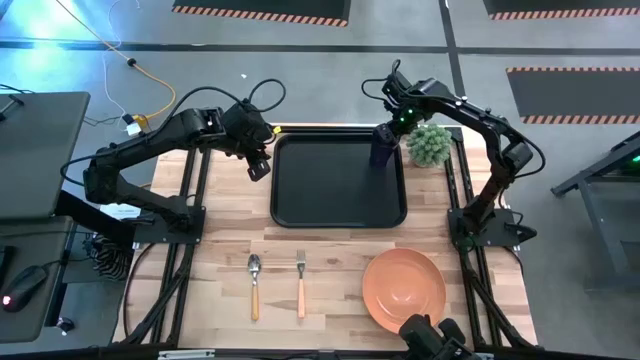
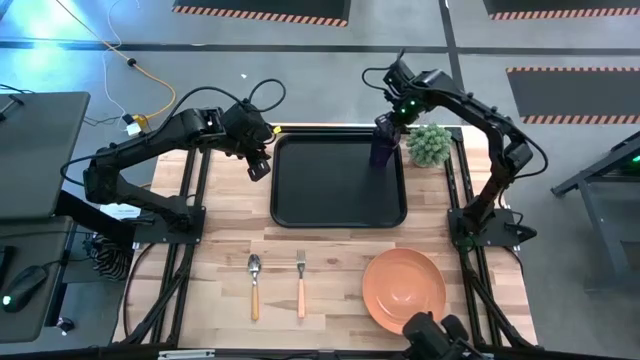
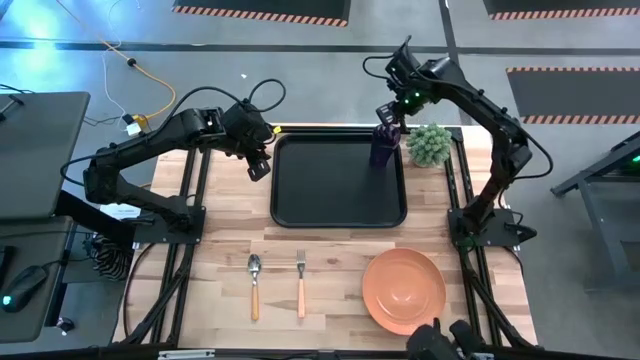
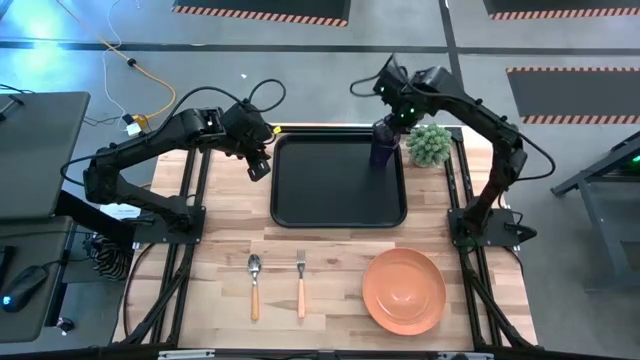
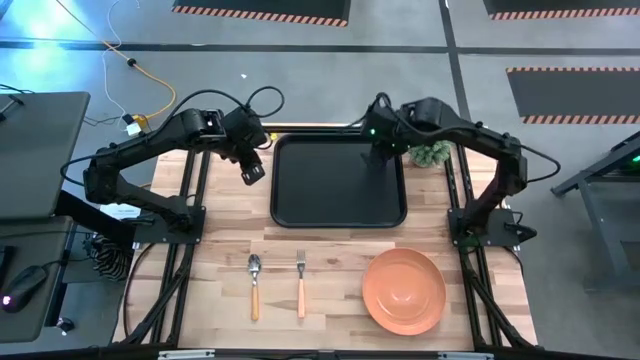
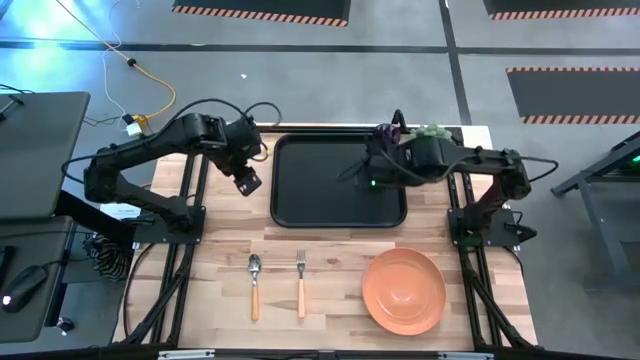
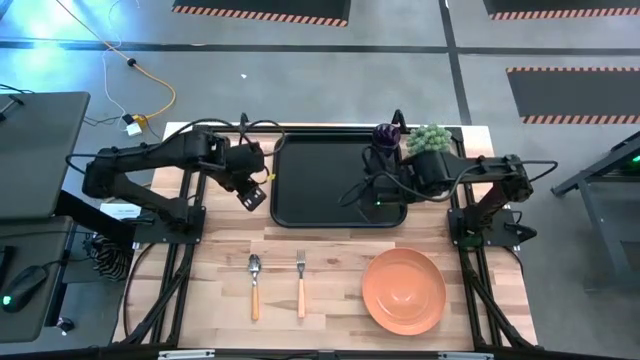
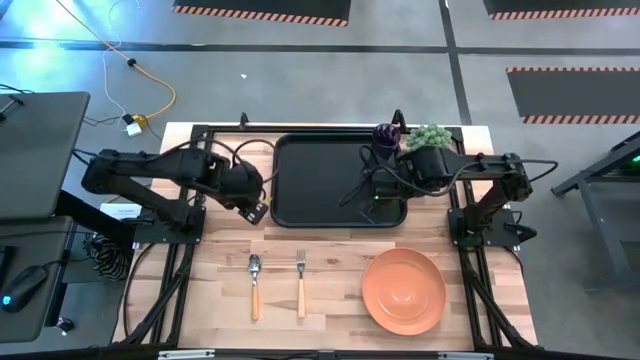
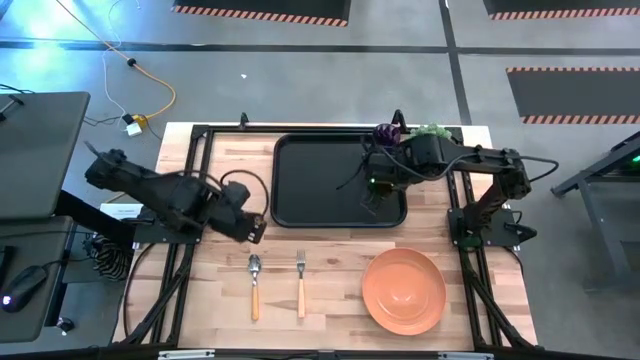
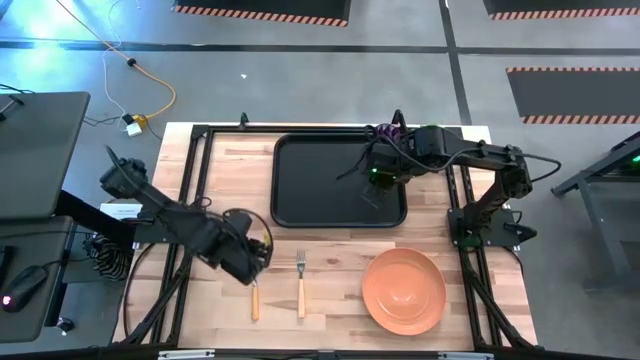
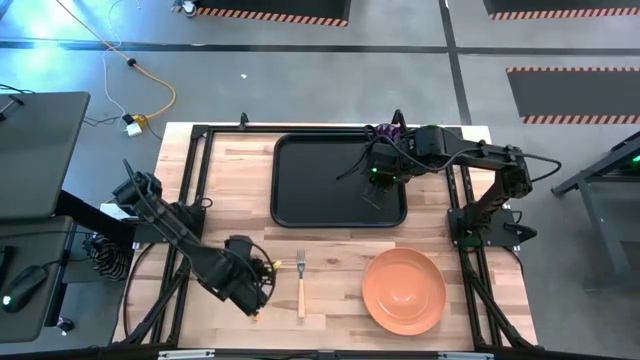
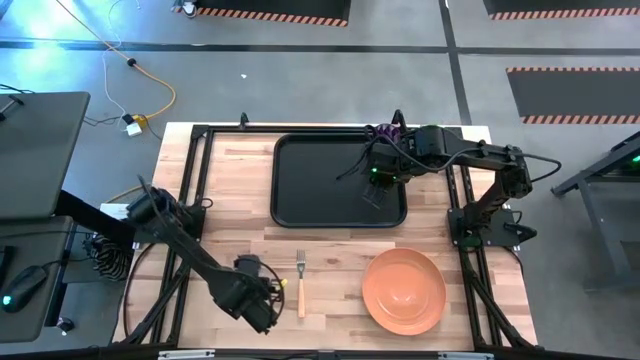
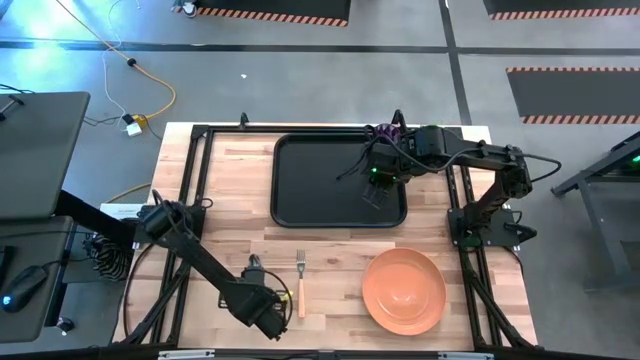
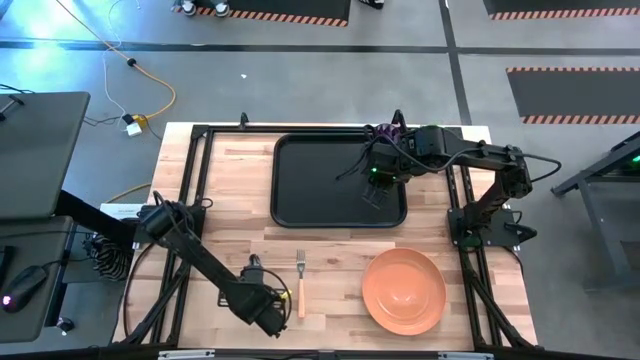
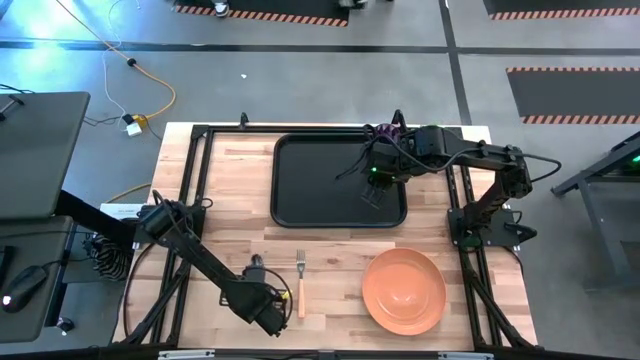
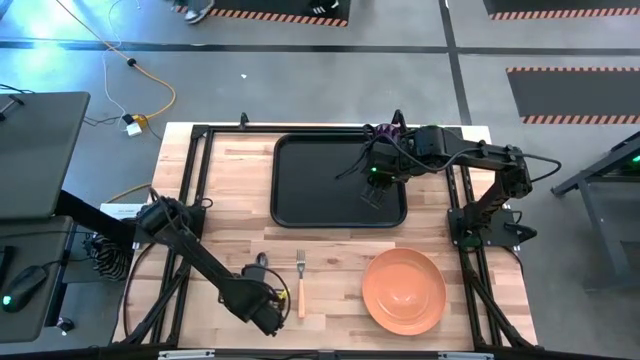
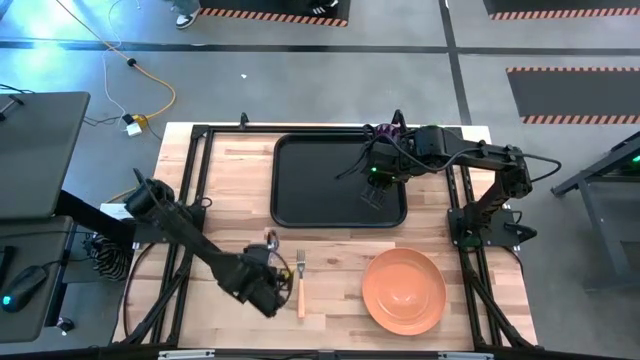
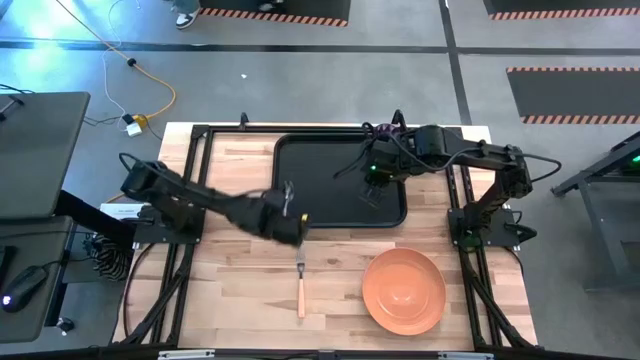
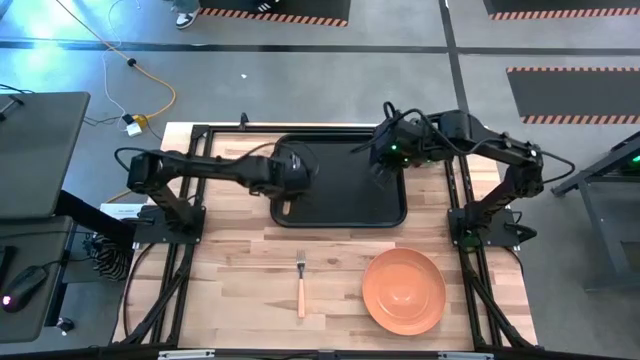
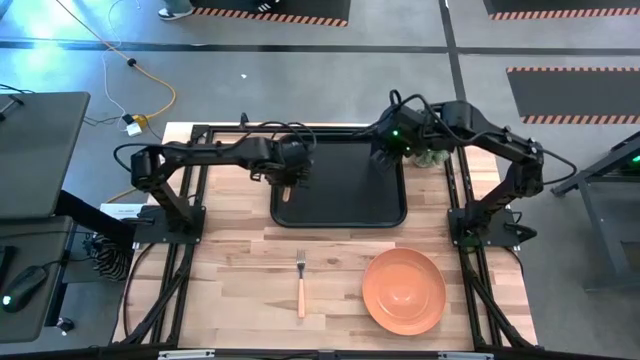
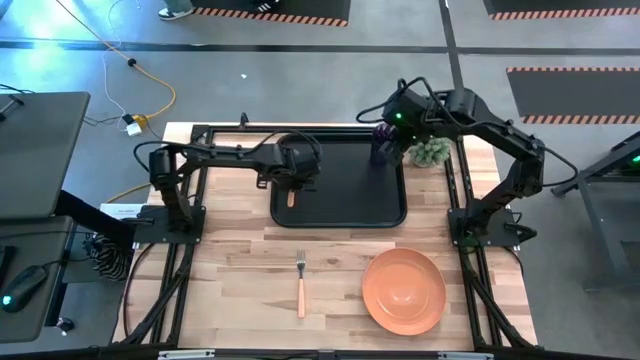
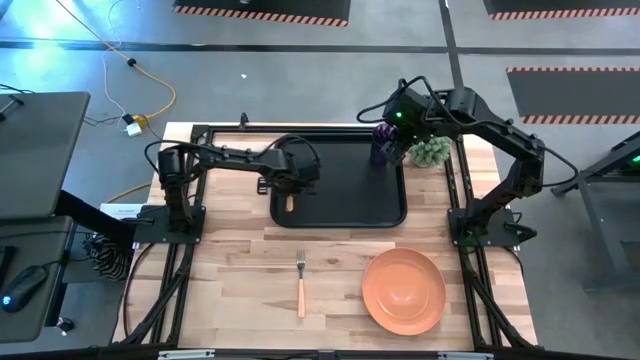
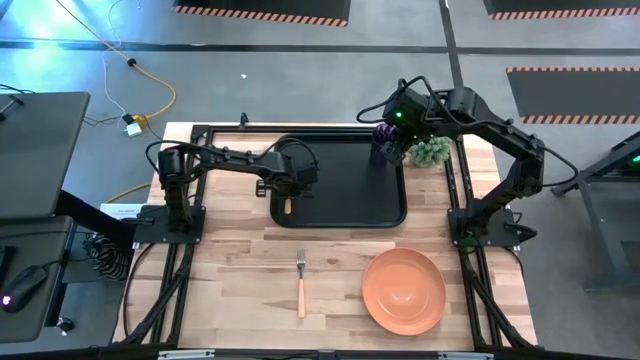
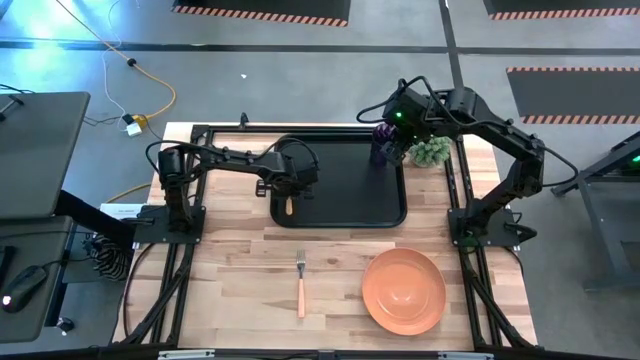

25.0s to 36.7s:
Task: Pick and place plate/cup/fork/spoon on tray
Put the yellow spoon on the left of the black serving tray
